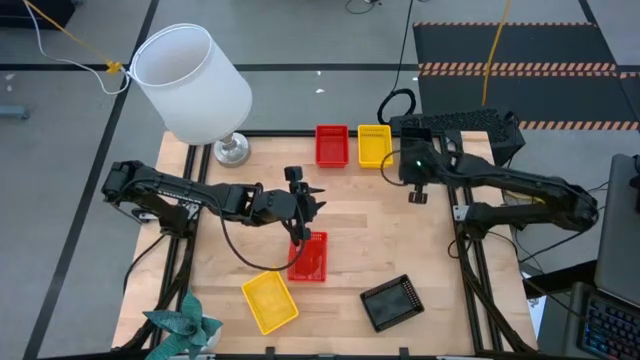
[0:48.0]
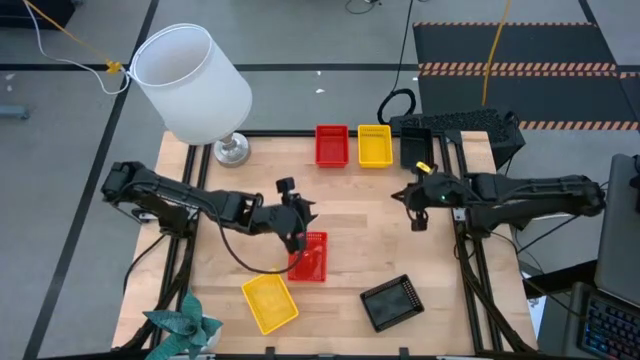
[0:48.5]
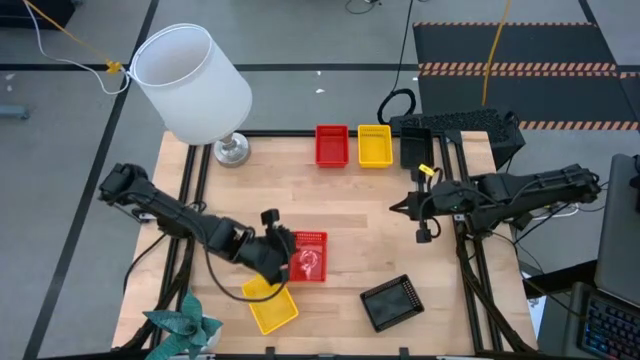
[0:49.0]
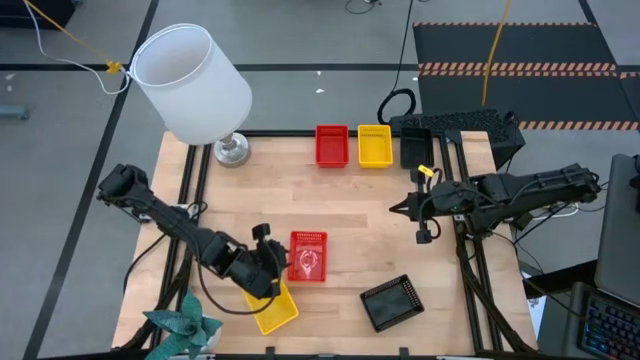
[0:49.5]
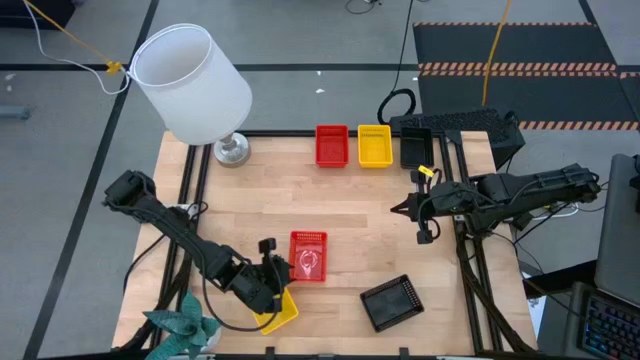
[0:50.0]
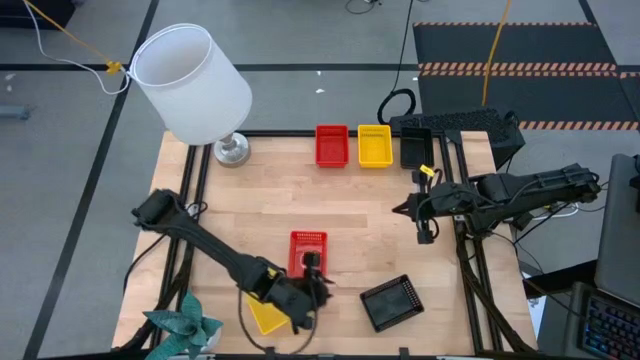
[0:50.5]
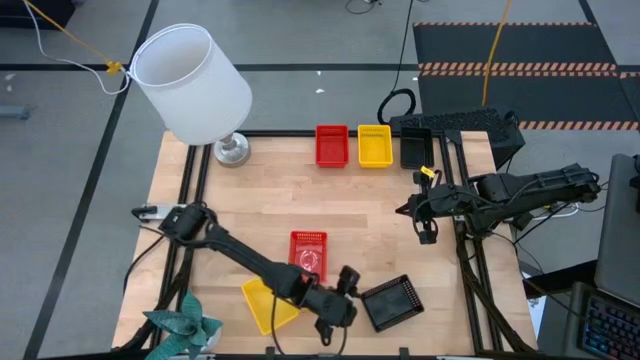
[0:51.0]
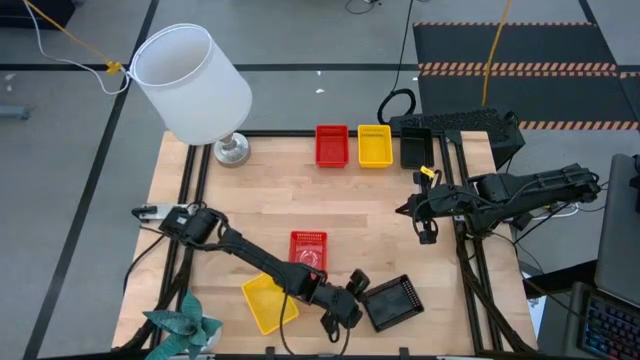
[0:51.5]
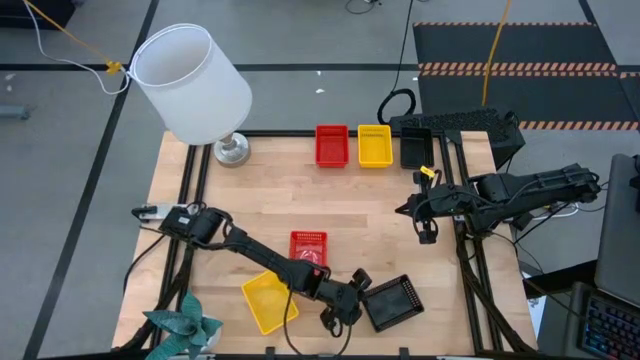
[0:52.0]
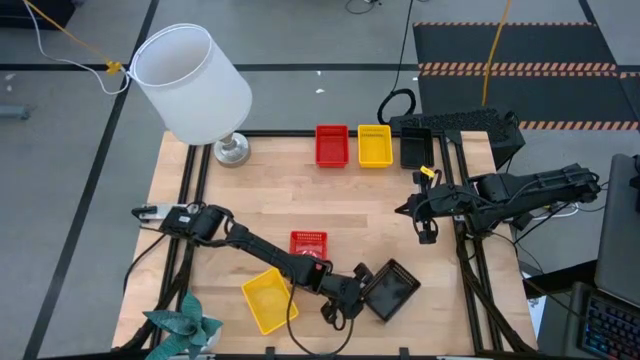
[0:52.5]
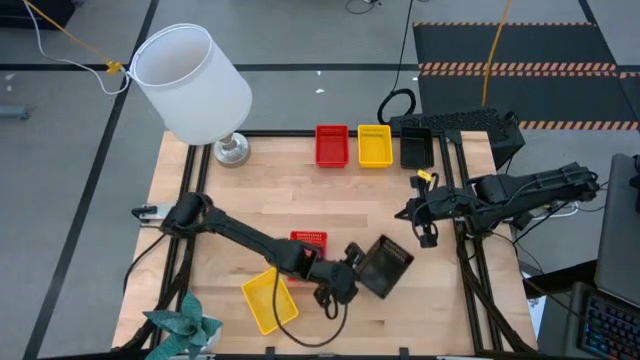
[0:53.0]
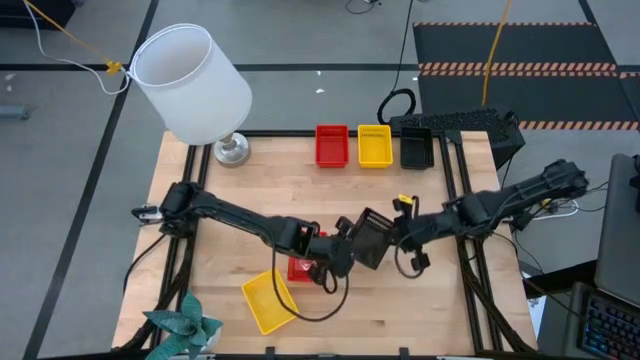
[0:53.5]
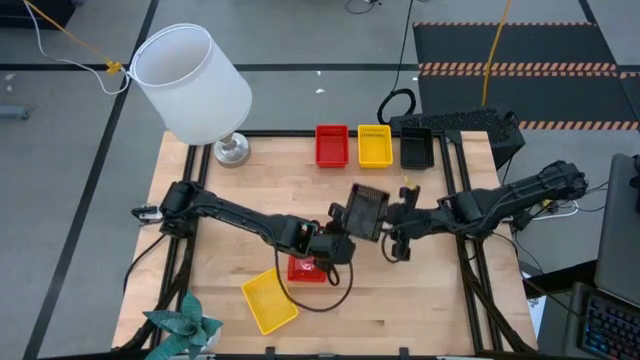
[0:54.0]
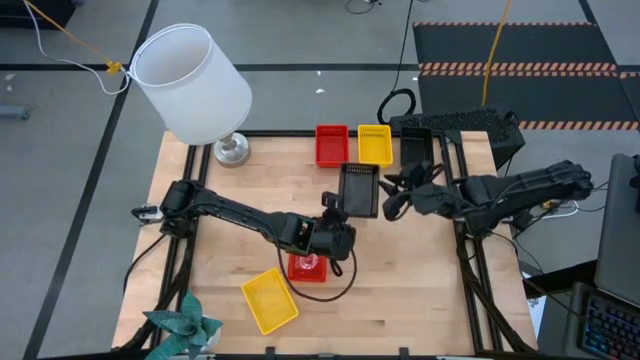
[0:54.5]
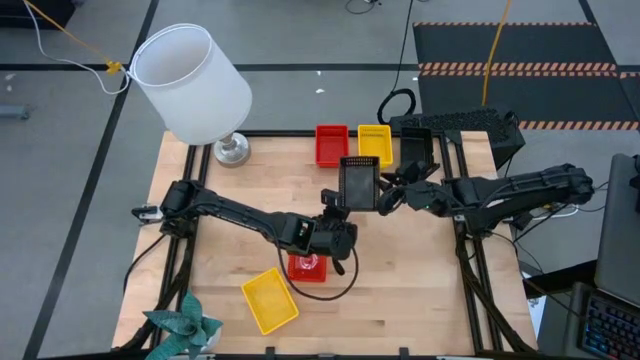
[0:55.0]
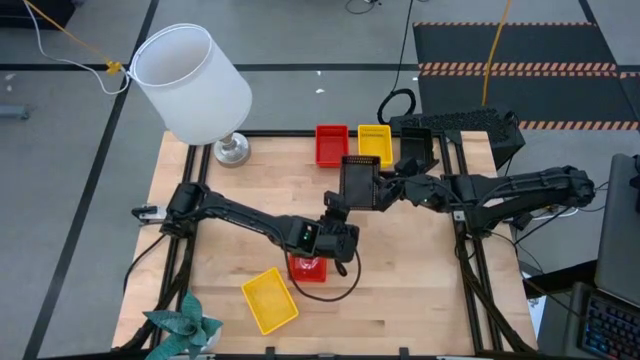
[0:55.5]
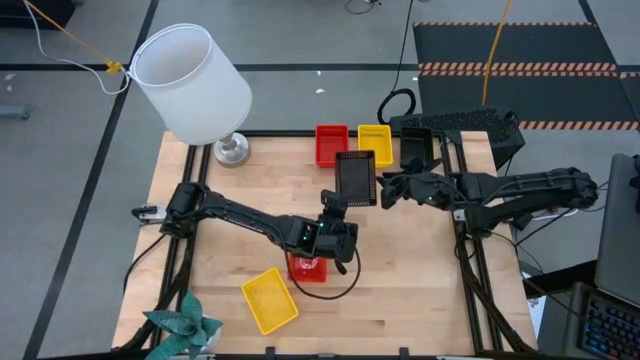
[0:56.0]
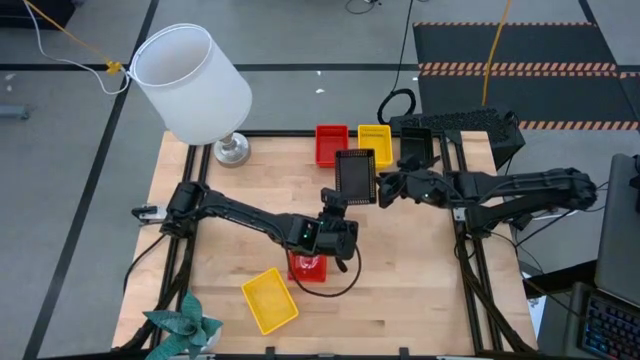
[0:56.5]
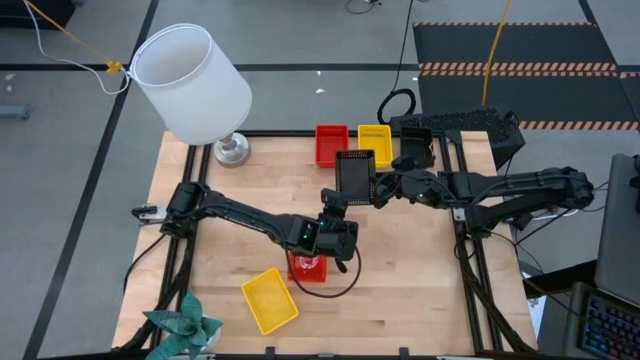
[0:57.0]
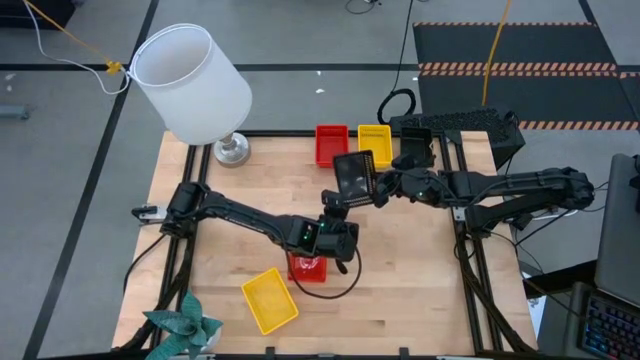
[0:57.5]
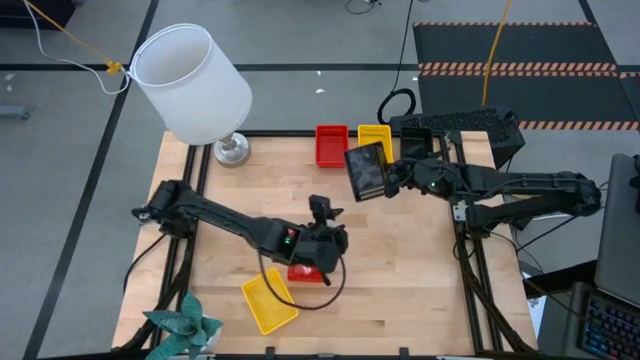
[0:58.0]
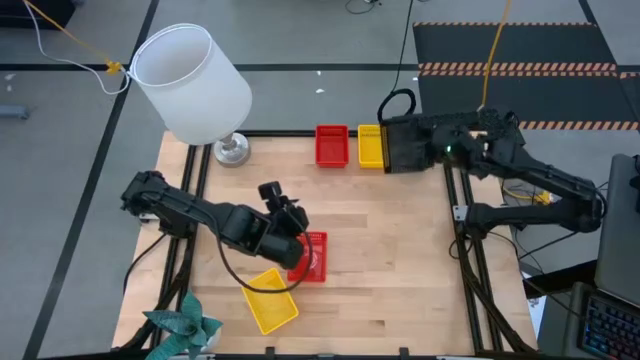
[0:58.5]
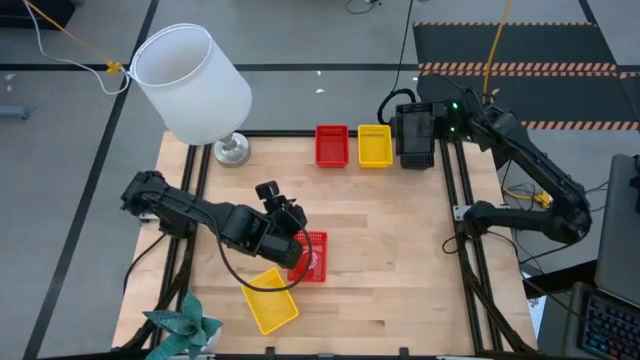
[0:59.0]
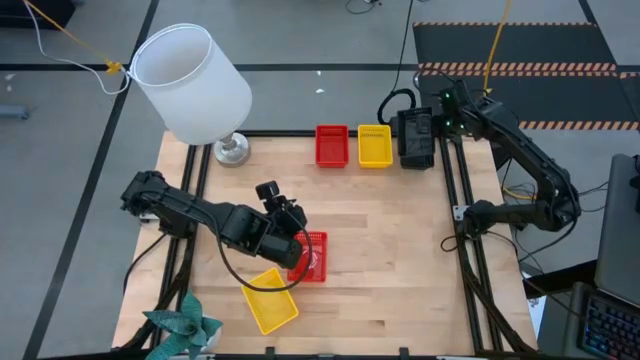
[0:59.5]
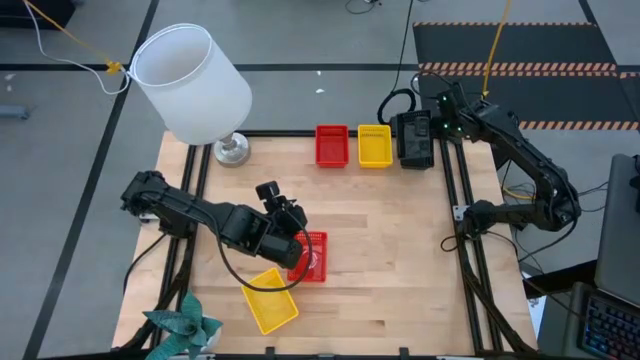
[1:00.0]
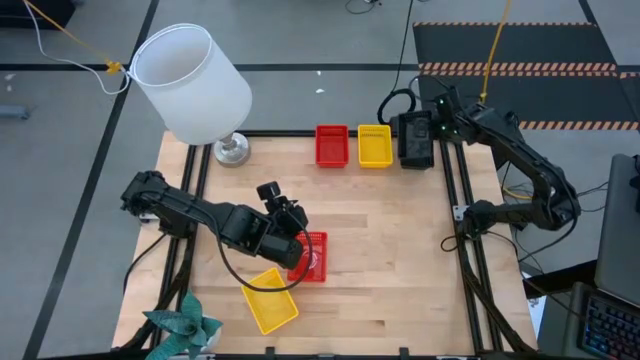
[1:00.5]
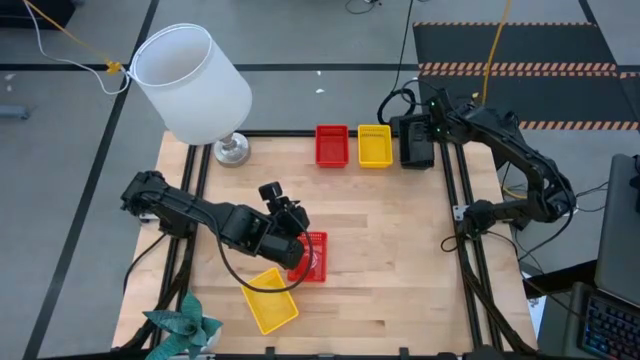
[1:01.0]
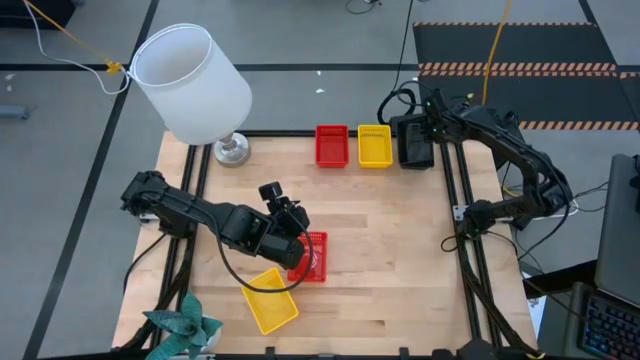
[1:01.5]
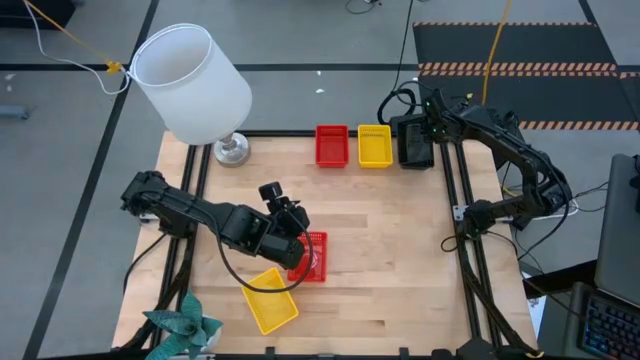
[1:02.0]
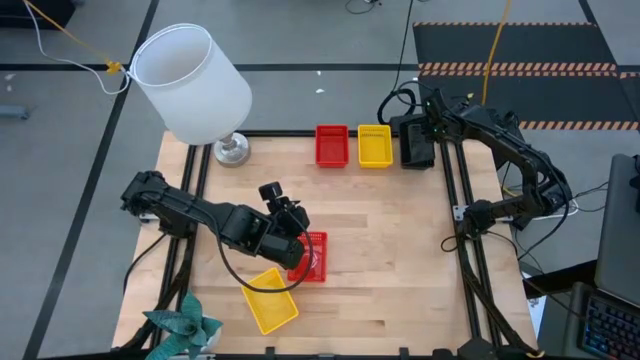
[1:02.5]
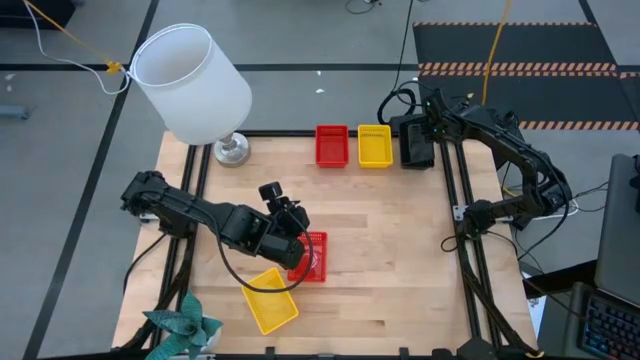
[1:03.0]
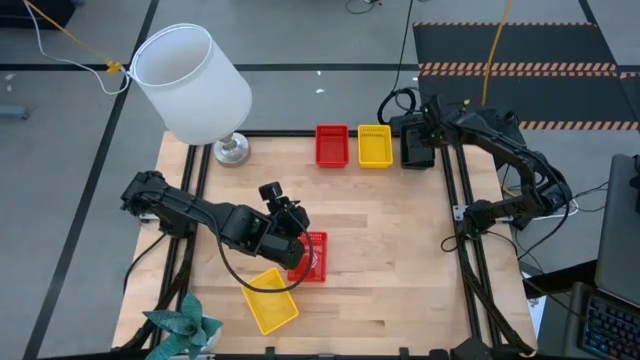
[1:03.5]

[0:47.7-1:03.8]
Stack the bottom black bin on top of the black bin

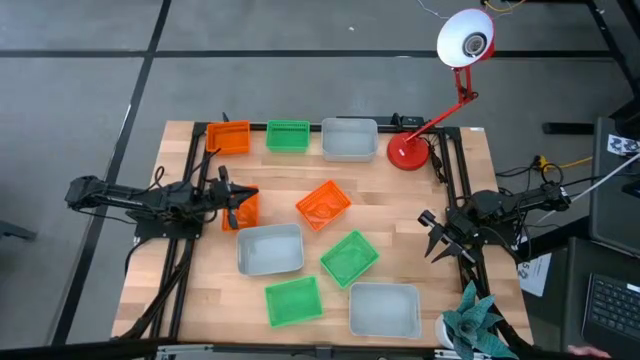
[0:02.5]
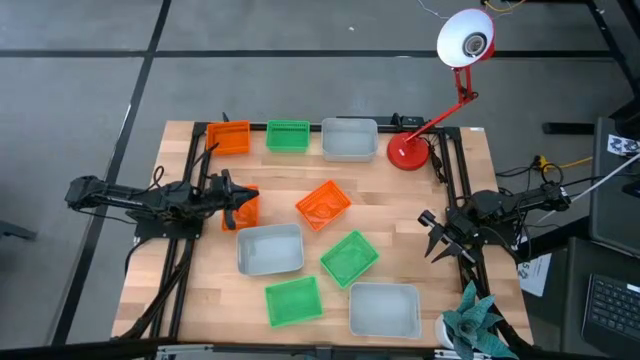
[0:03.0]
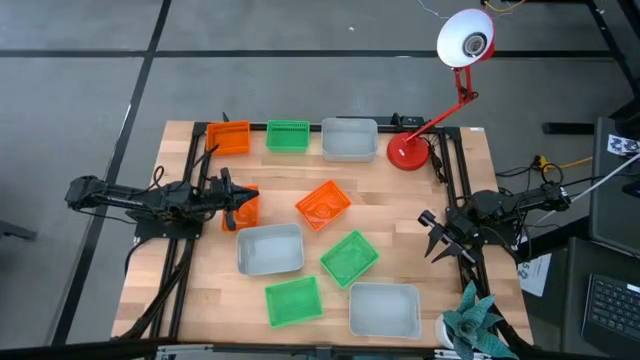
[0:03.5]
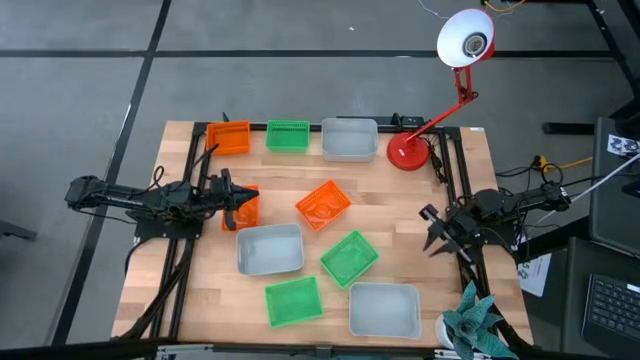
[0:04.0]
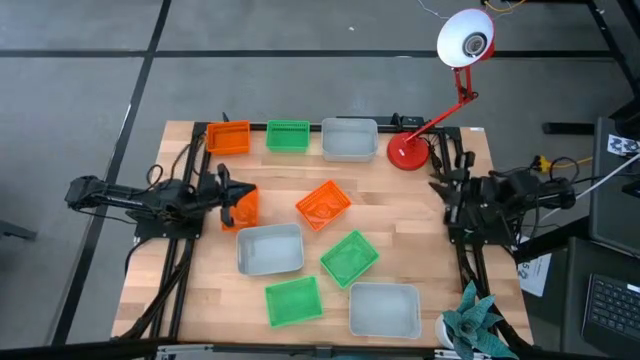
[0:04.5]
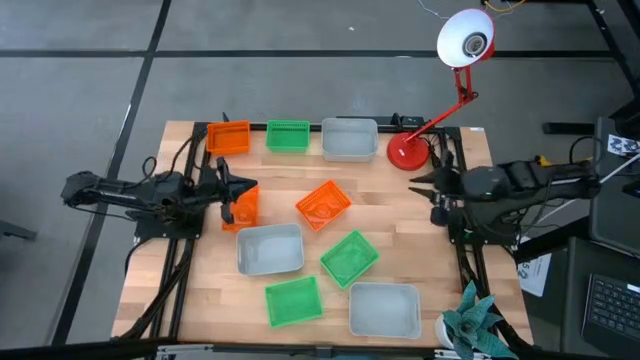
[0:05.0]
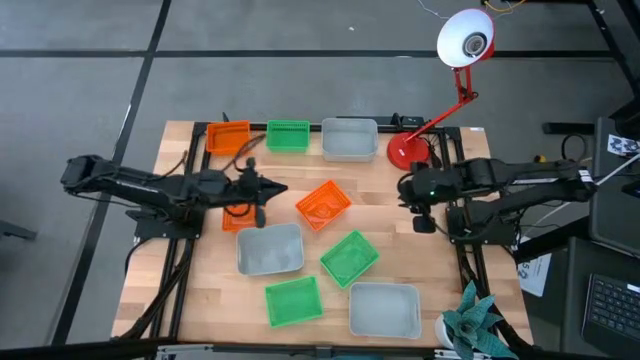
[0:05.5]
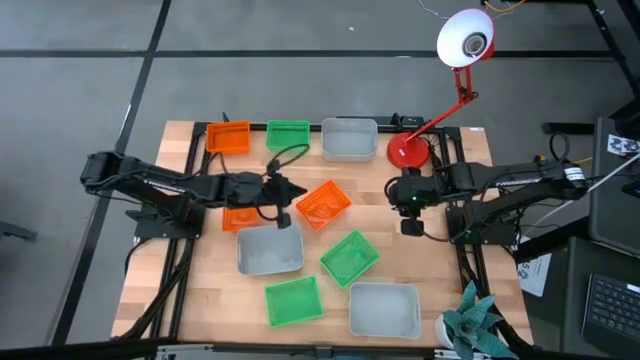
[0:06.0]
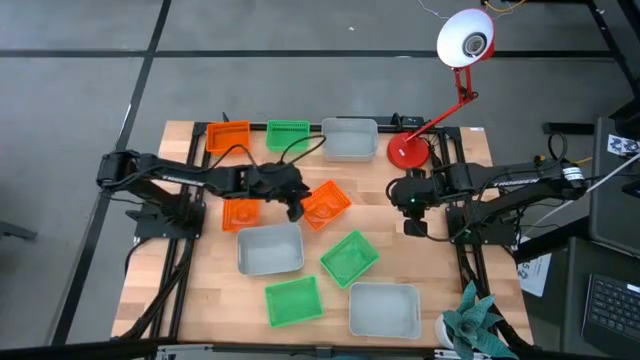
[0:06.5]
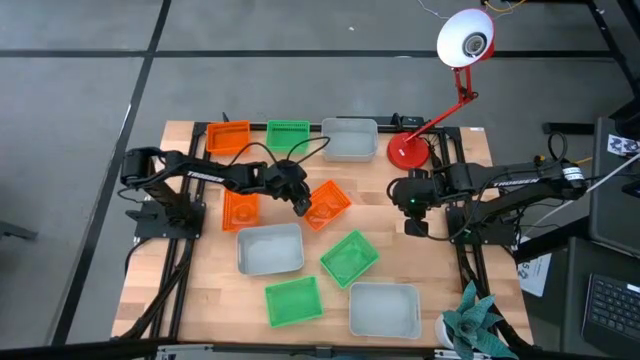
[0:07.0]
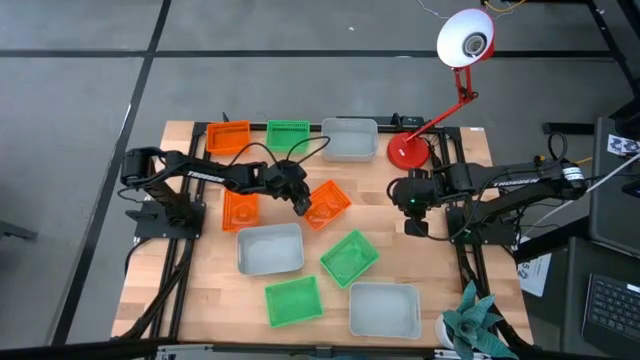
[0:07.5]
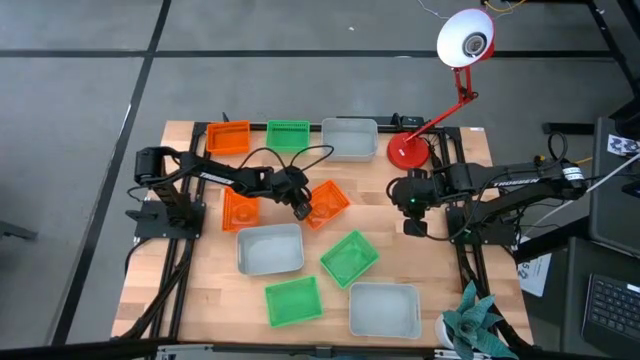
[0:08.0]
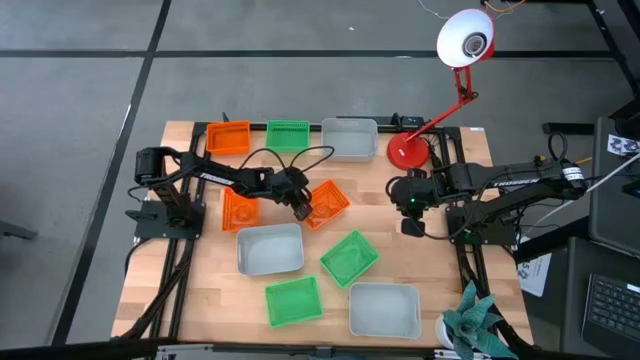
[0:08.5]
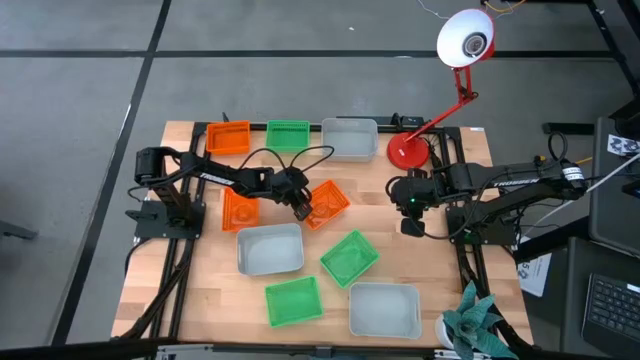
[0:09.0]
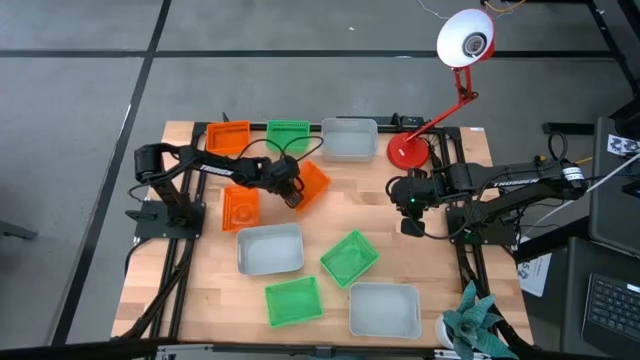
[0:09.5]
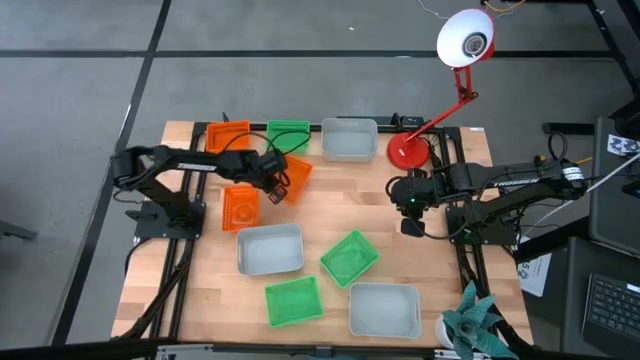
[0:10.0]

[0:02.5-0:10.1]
Move the orange bin to the top left of the table
